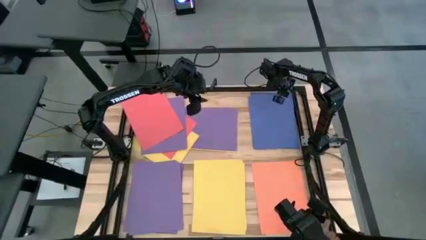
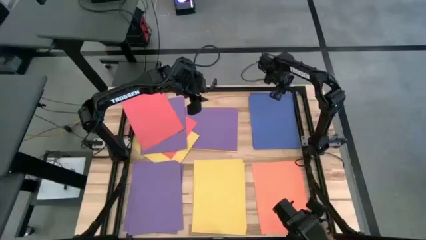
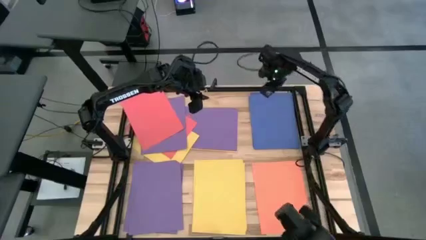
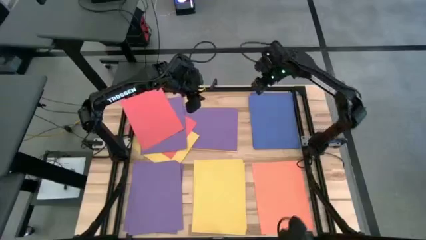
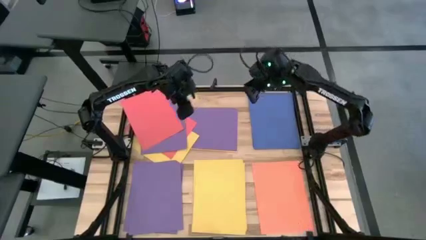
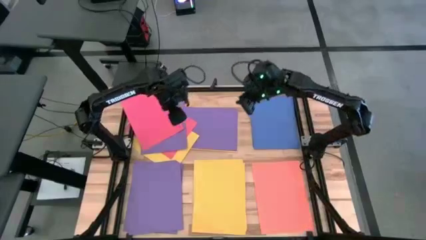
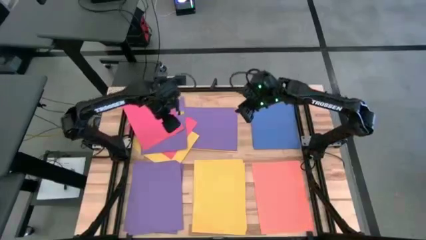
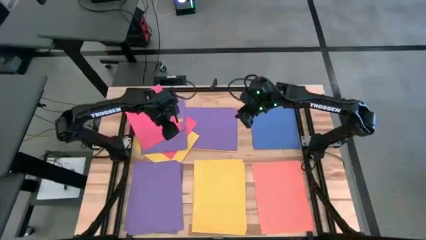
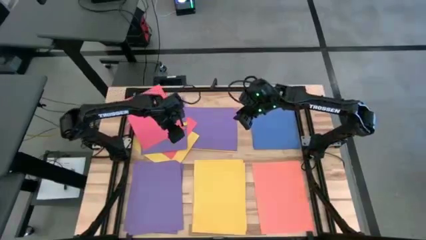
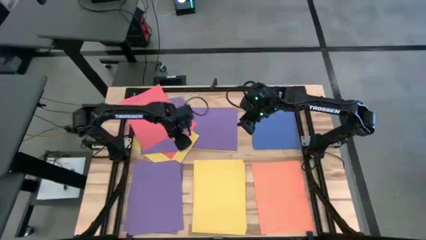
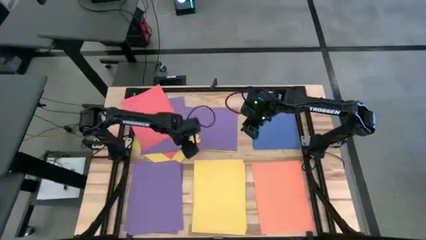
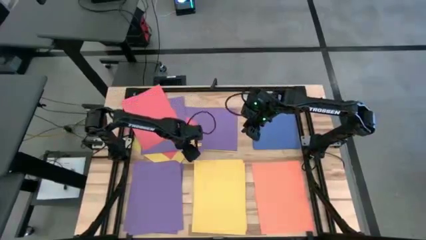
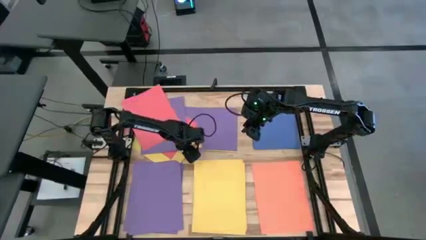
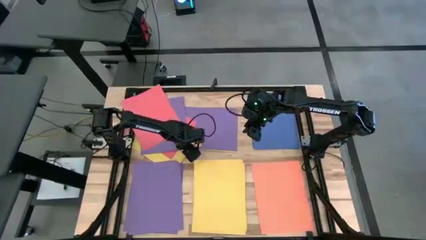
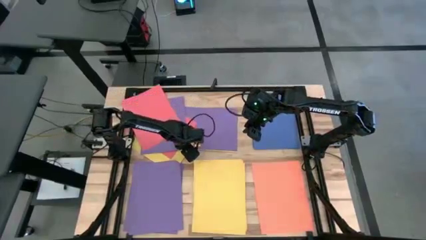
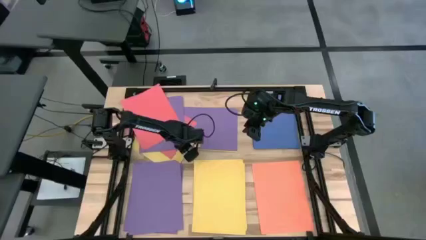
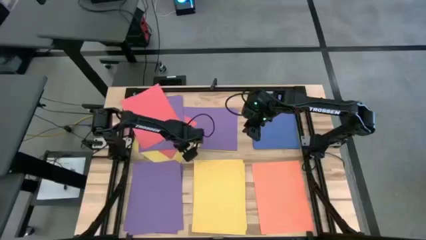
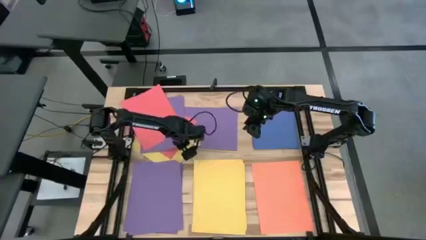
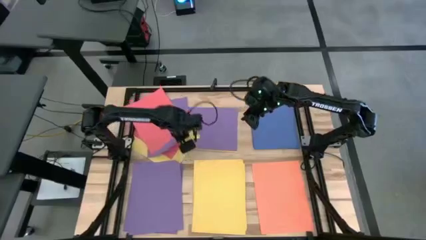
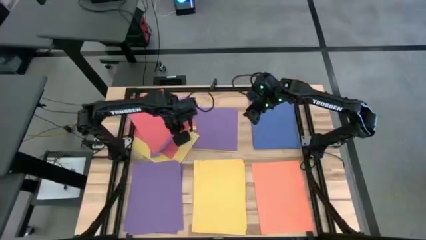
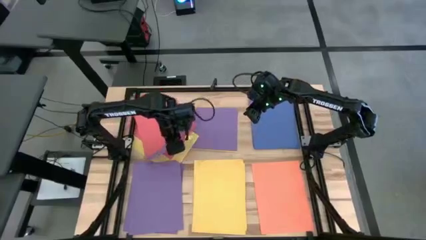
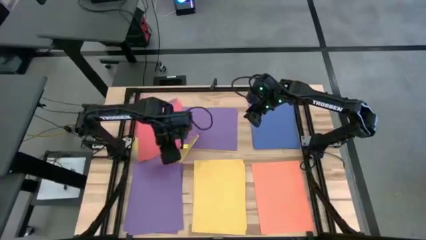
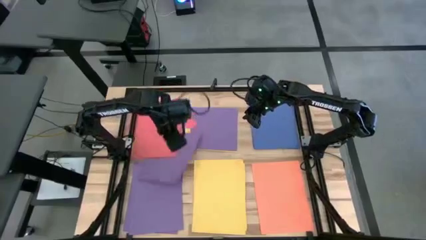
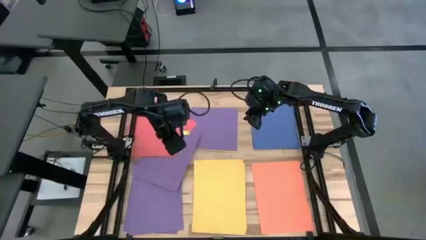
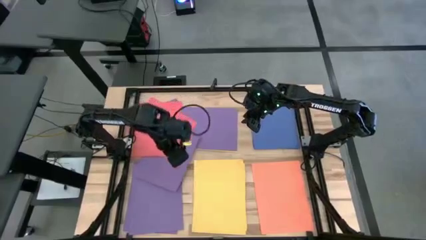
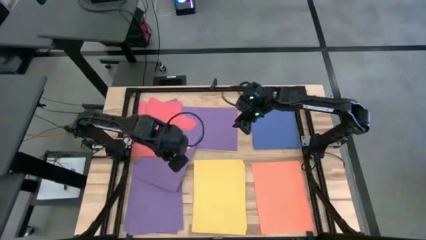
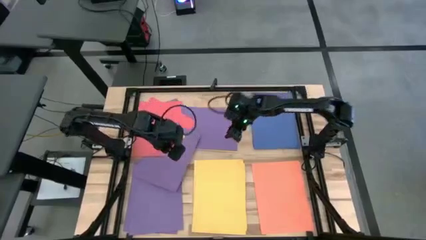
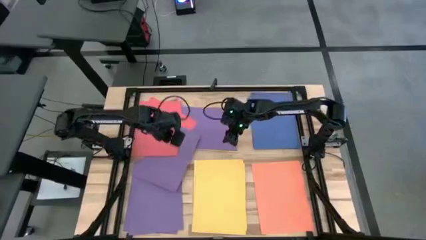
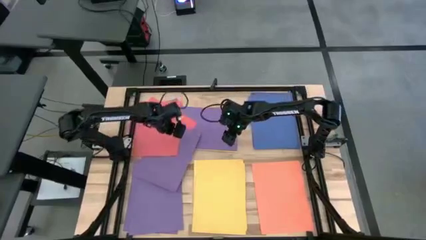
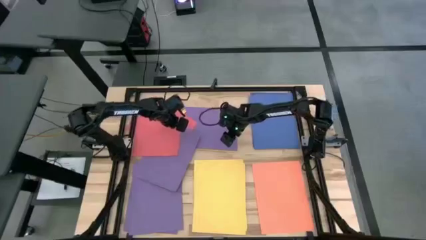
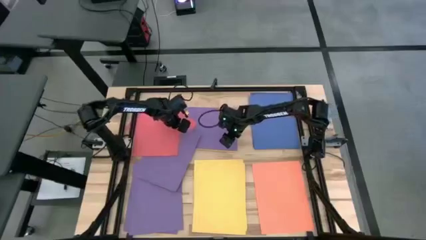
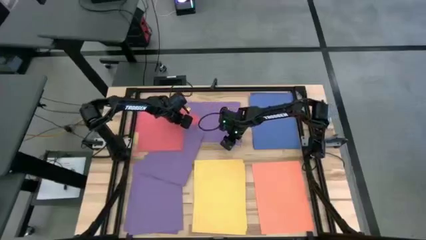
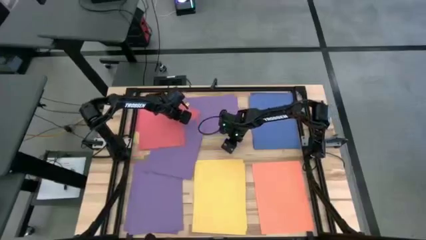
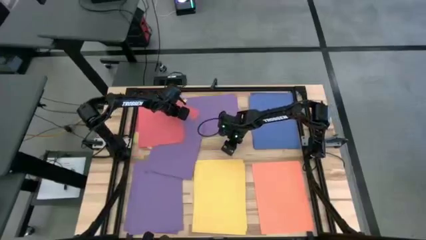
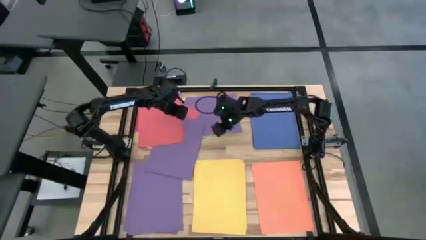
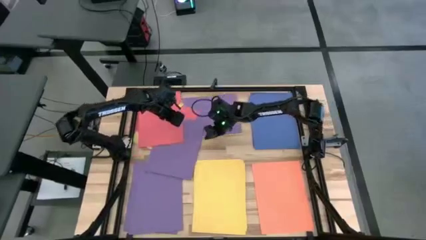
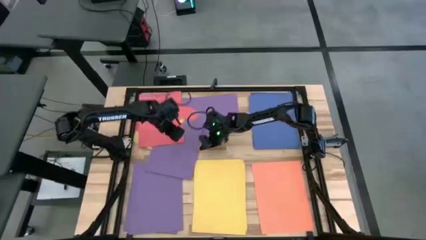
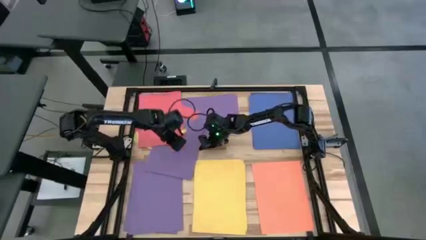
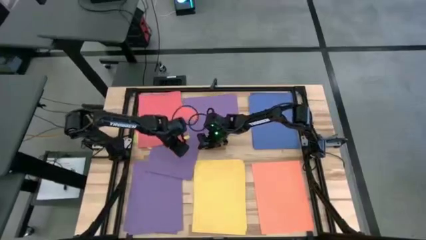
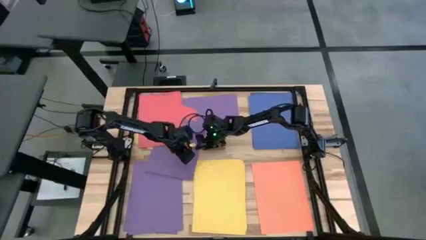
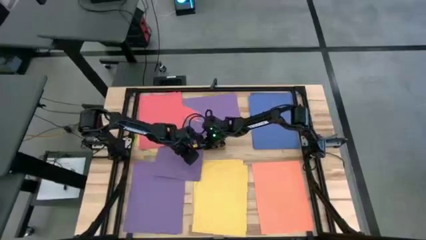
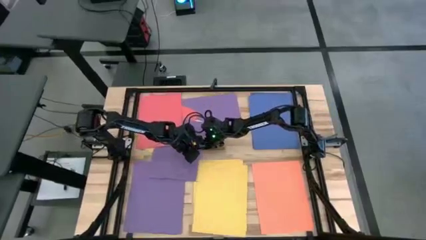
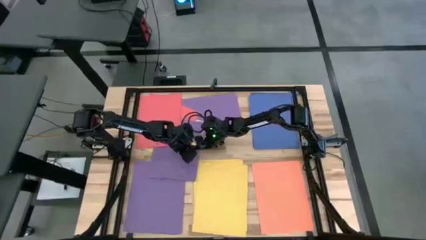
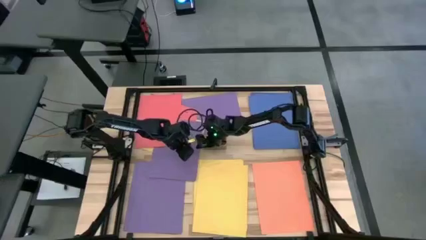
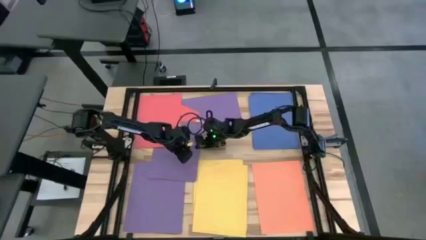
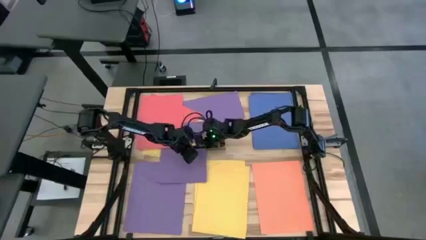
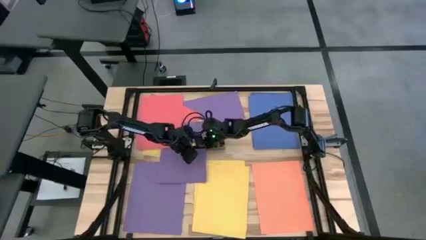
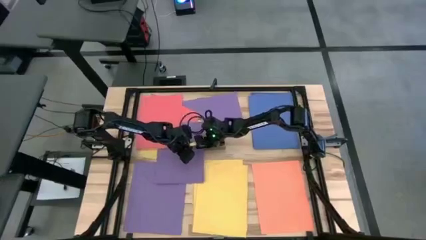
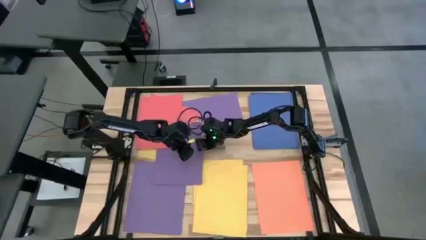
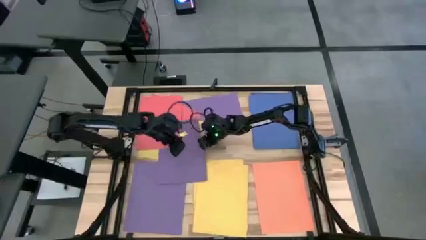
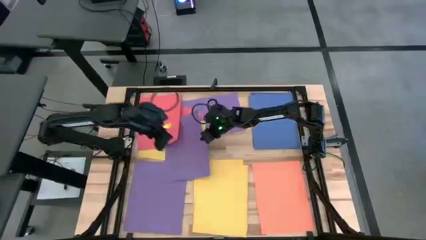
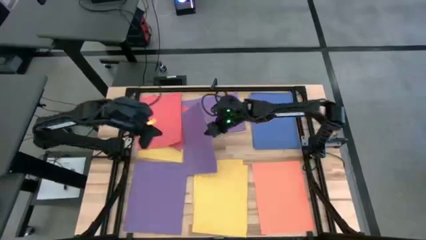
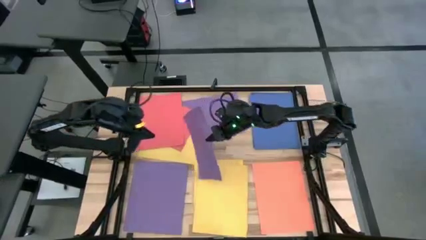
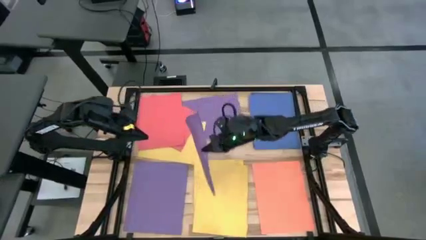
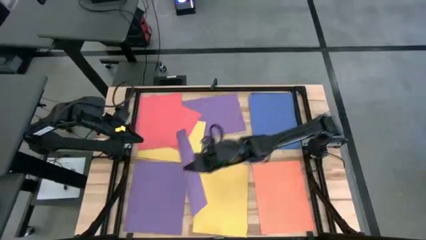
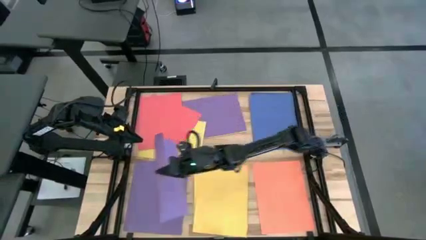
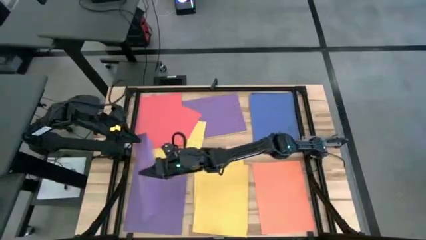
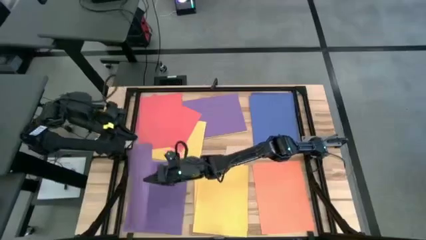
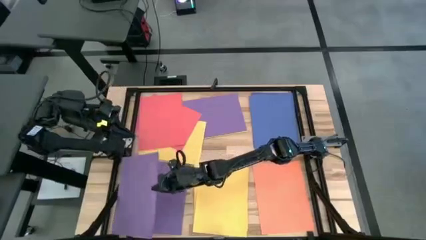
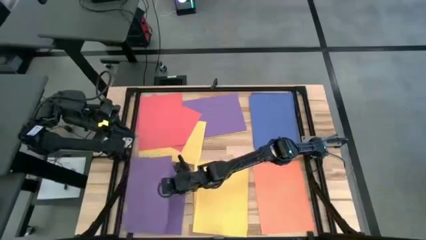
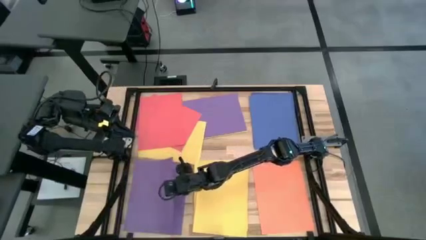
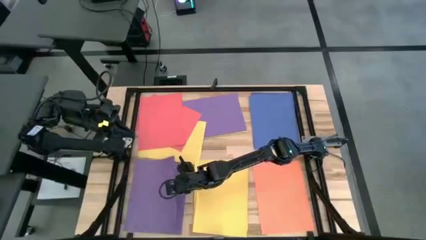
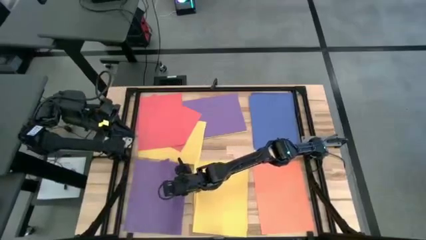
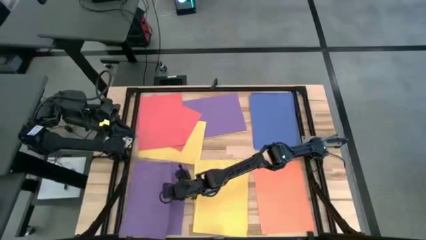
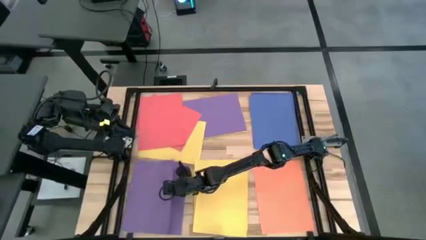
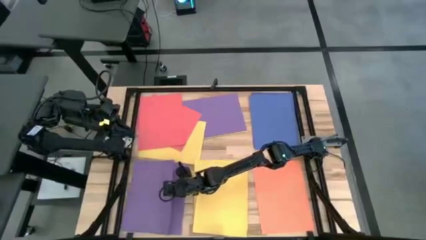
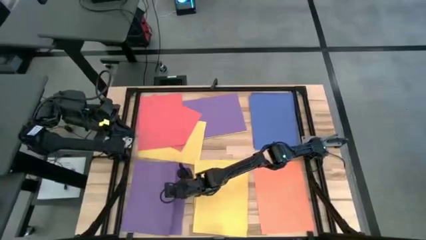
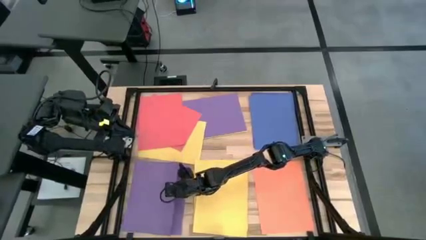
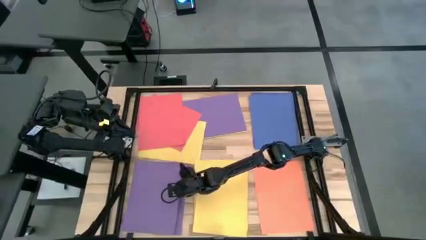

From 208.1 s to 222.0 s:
Task: Organize paper
Stack the purple paper on top of the purple paper
